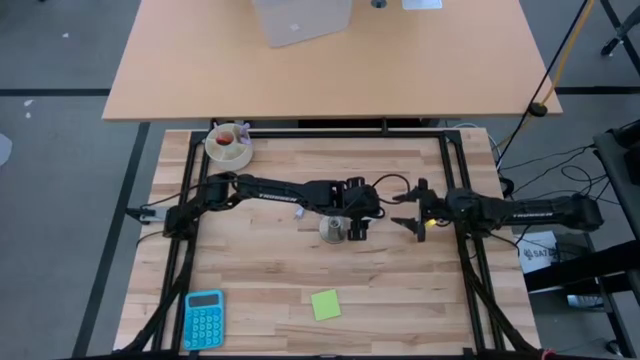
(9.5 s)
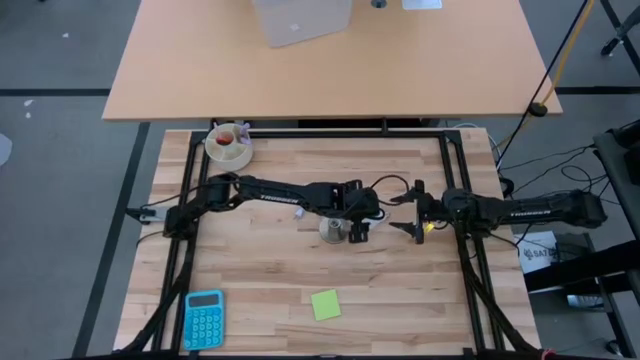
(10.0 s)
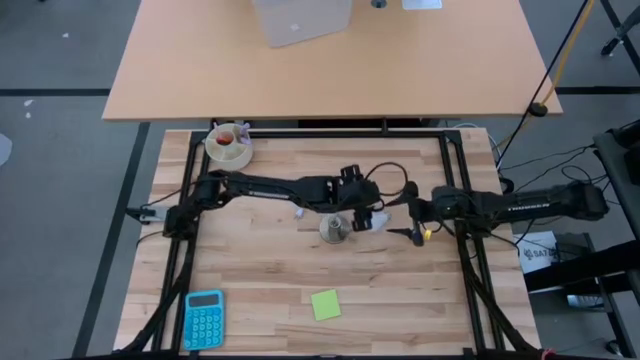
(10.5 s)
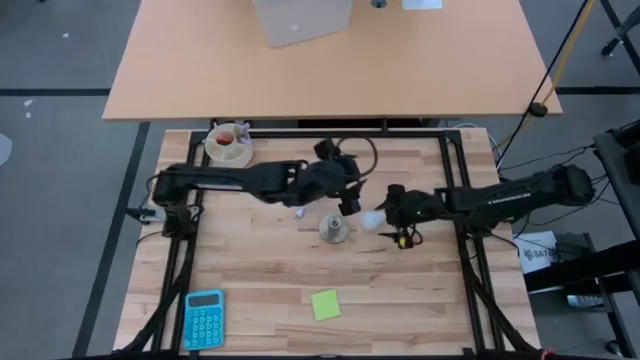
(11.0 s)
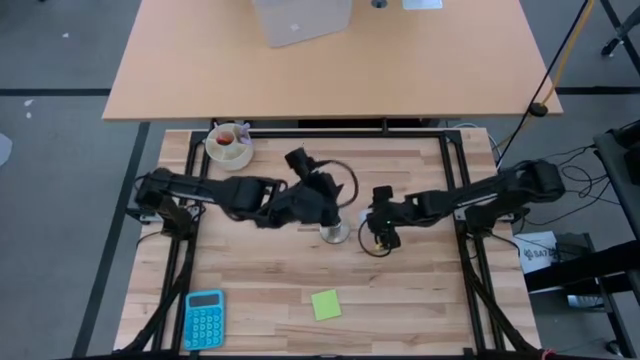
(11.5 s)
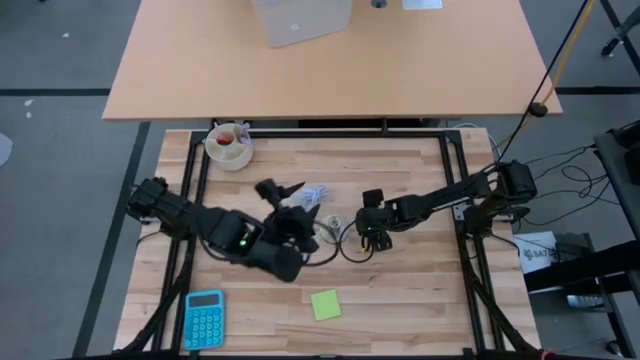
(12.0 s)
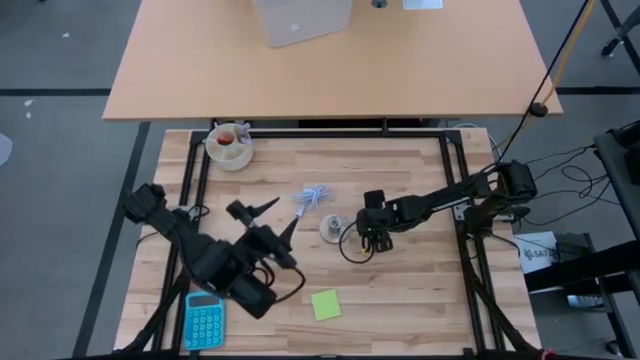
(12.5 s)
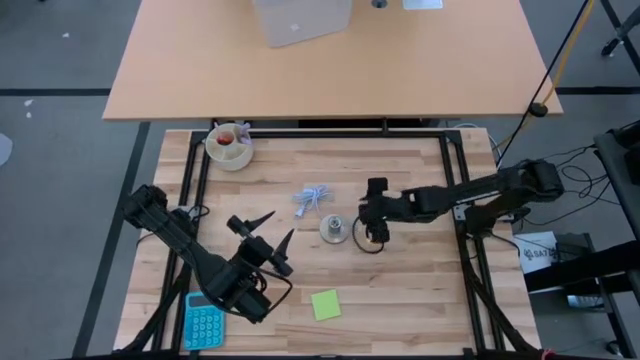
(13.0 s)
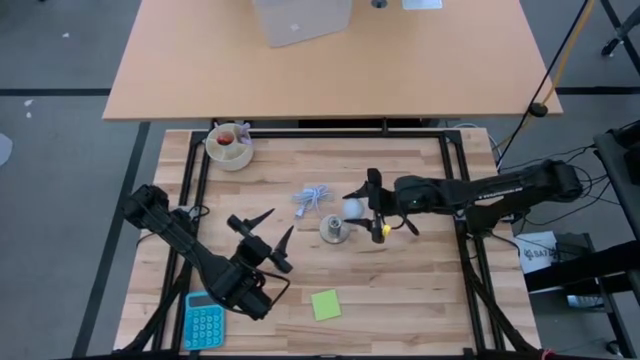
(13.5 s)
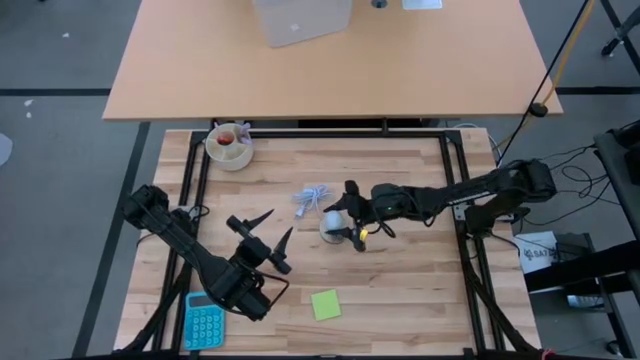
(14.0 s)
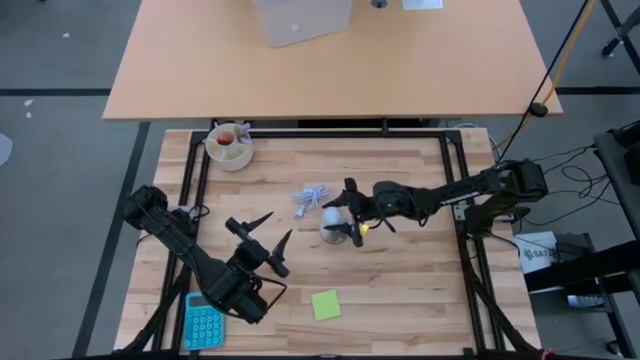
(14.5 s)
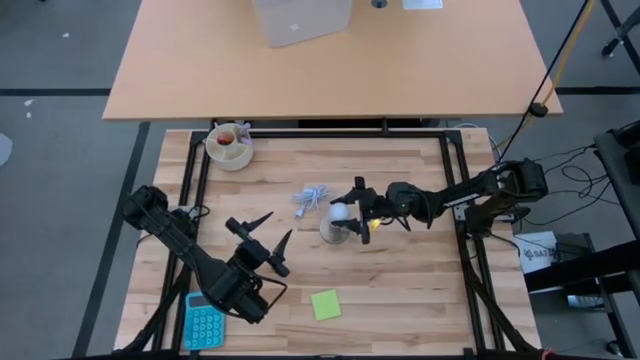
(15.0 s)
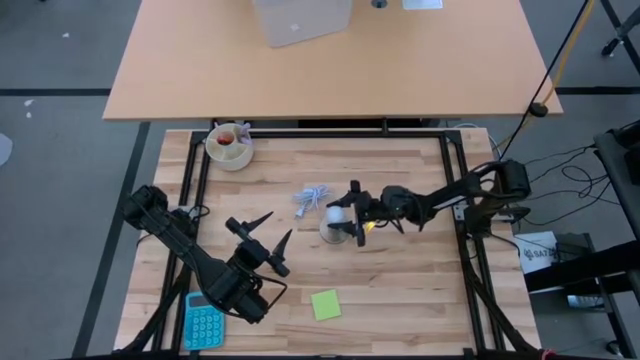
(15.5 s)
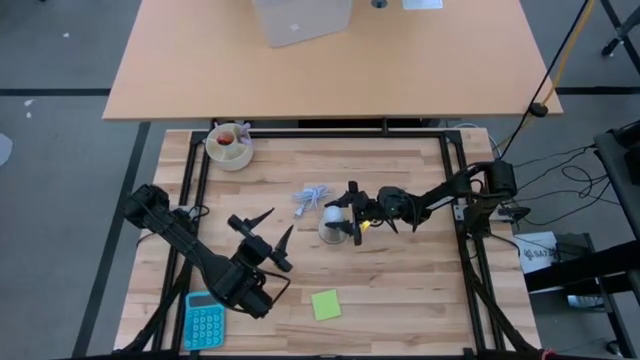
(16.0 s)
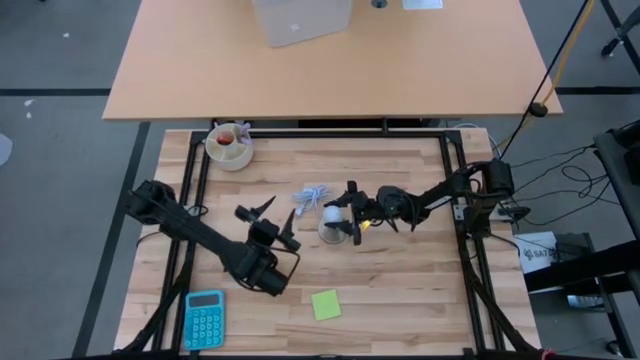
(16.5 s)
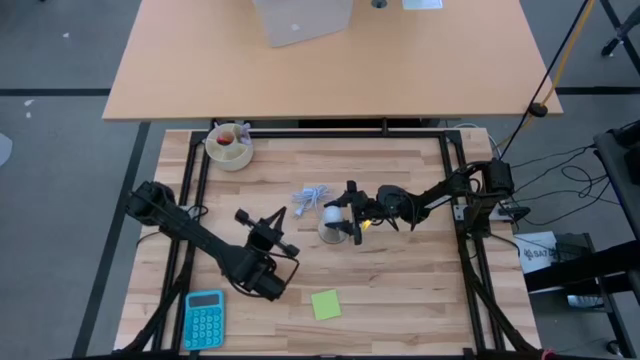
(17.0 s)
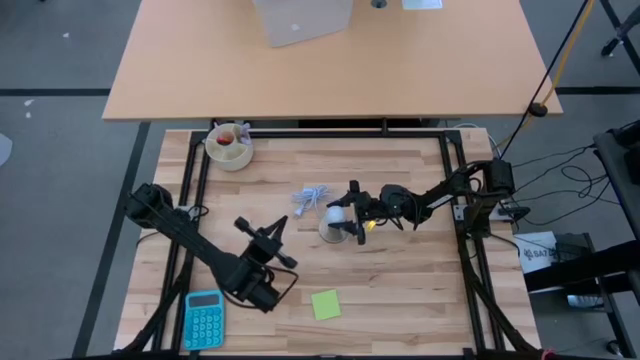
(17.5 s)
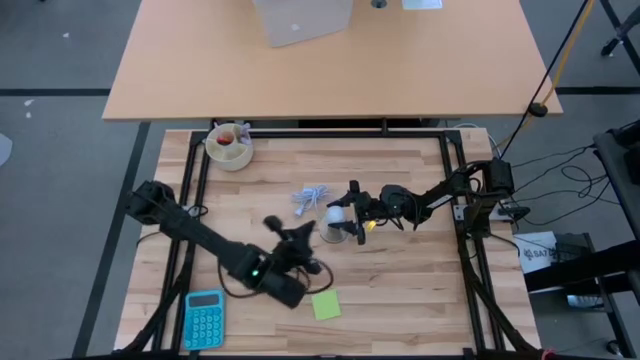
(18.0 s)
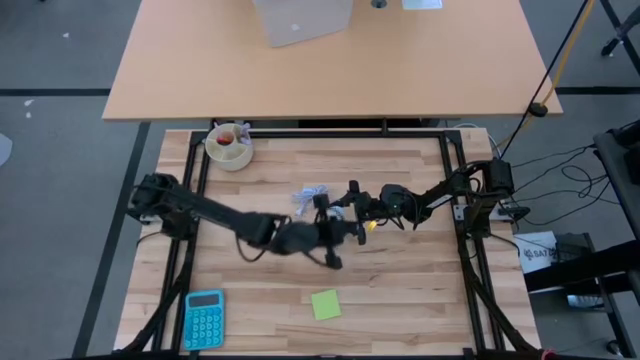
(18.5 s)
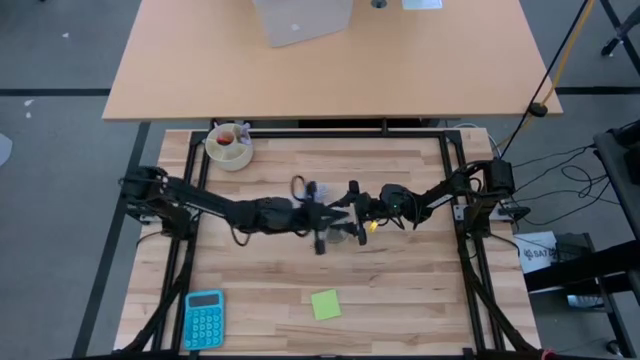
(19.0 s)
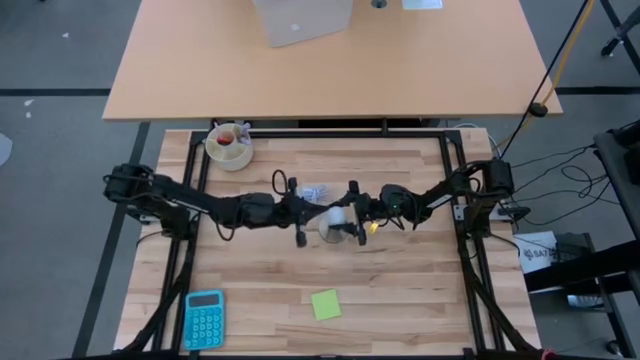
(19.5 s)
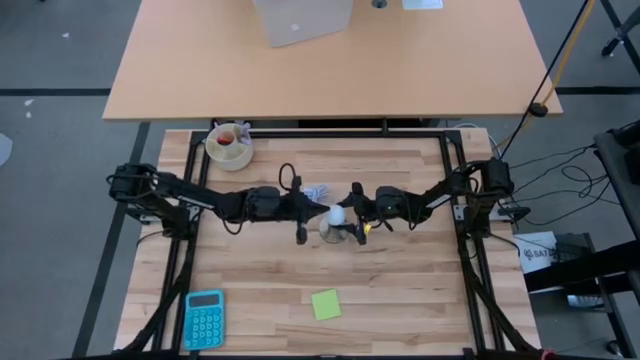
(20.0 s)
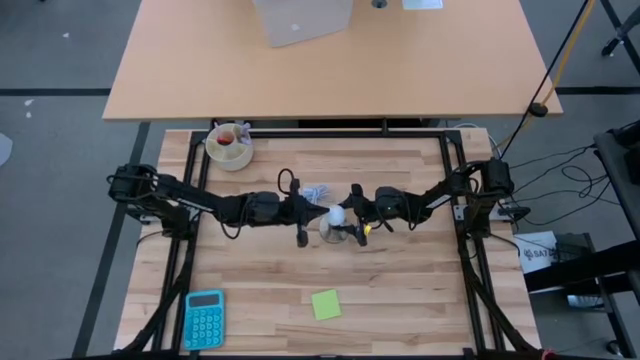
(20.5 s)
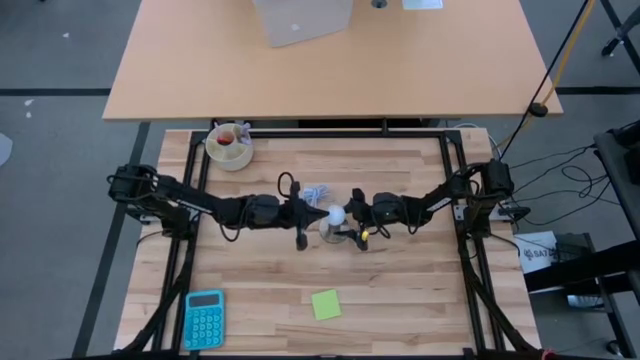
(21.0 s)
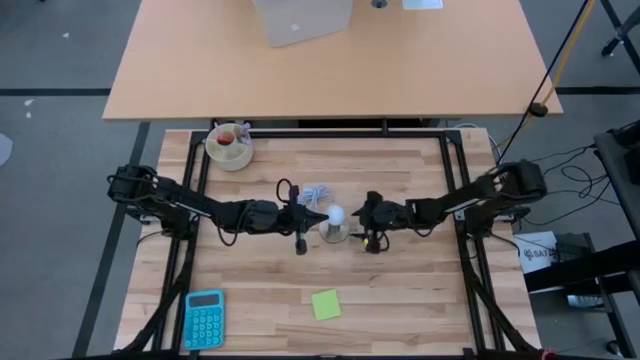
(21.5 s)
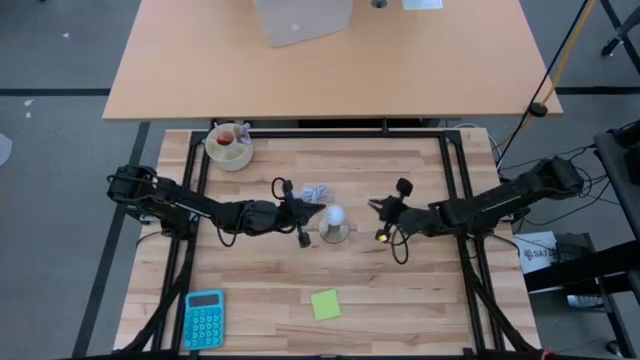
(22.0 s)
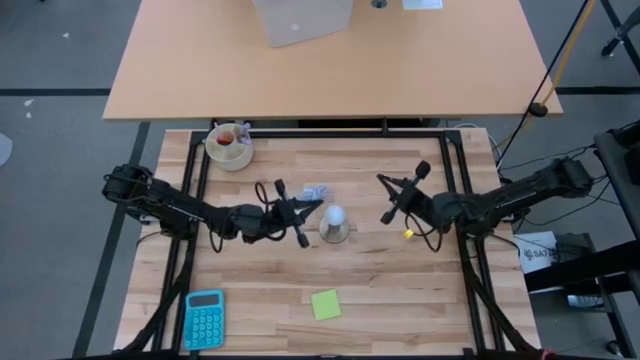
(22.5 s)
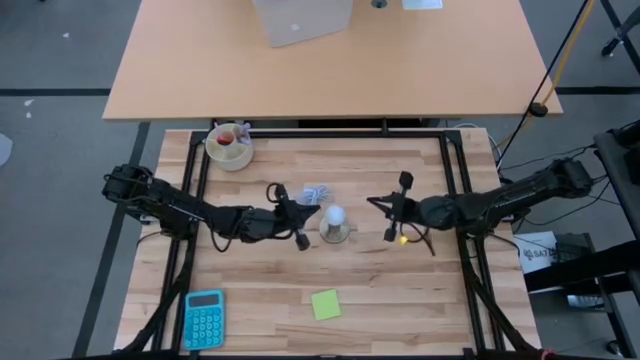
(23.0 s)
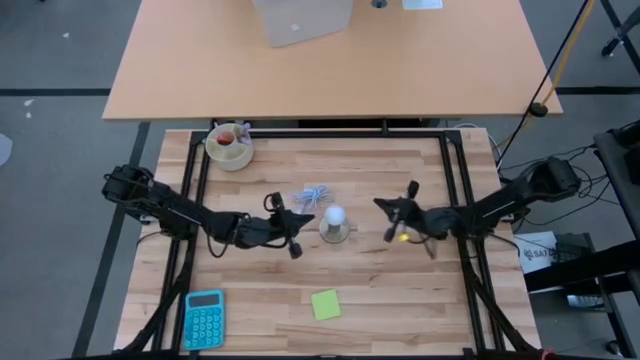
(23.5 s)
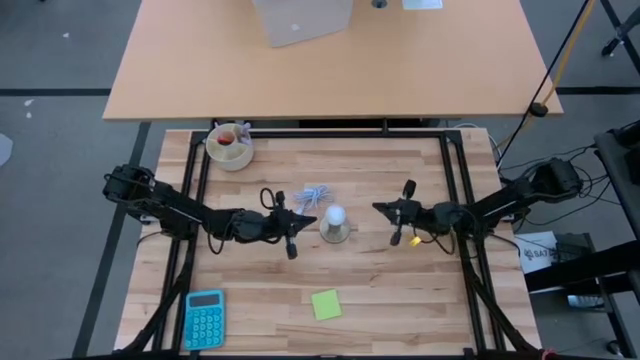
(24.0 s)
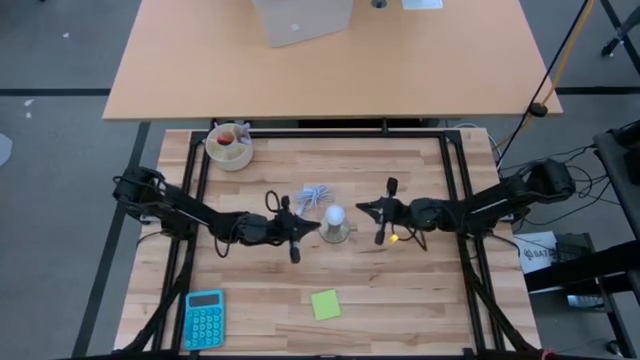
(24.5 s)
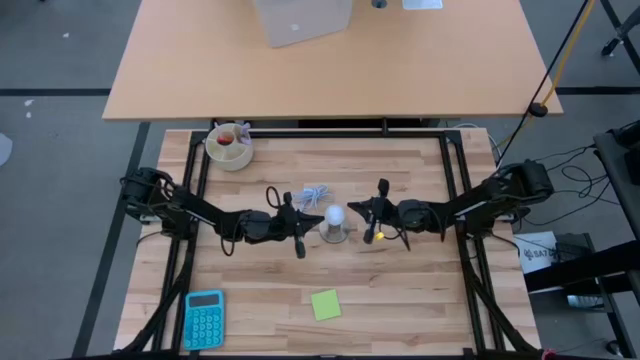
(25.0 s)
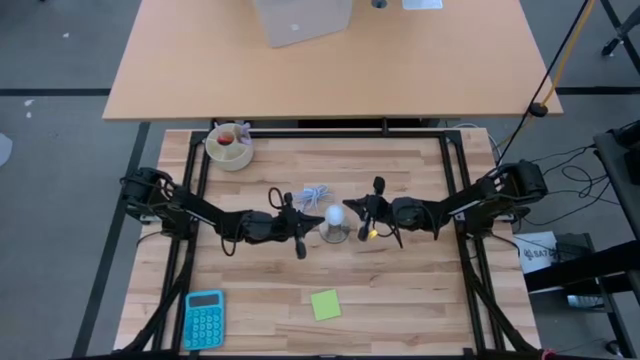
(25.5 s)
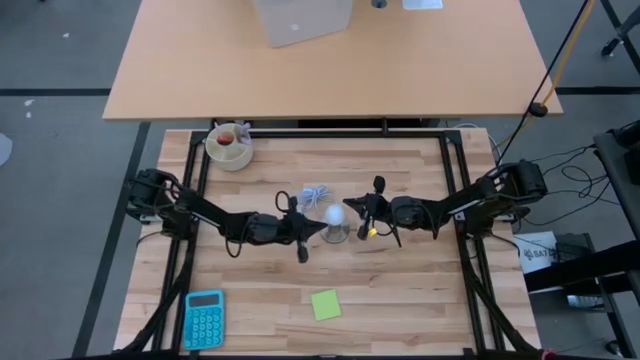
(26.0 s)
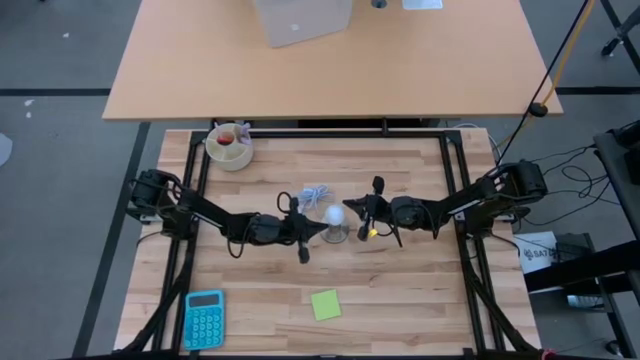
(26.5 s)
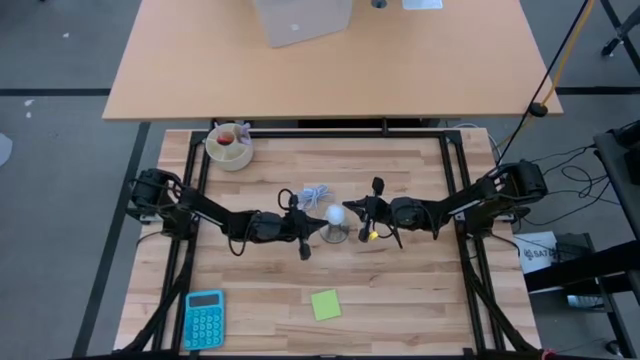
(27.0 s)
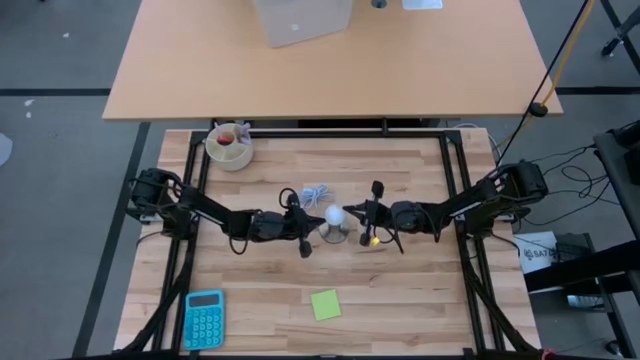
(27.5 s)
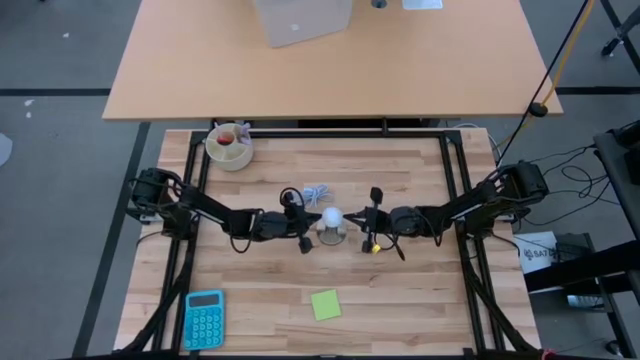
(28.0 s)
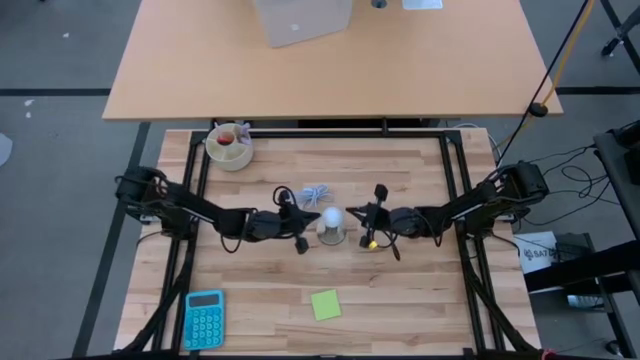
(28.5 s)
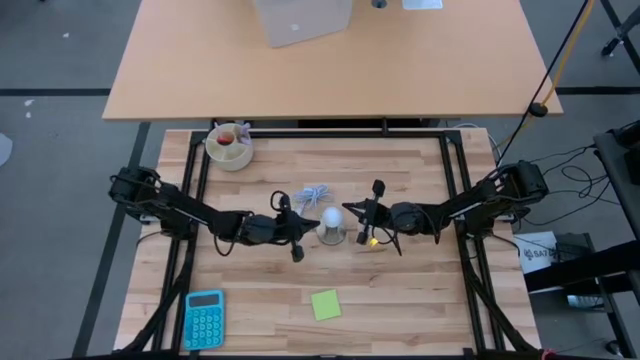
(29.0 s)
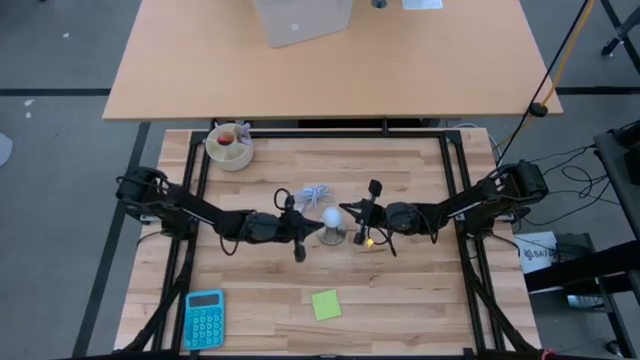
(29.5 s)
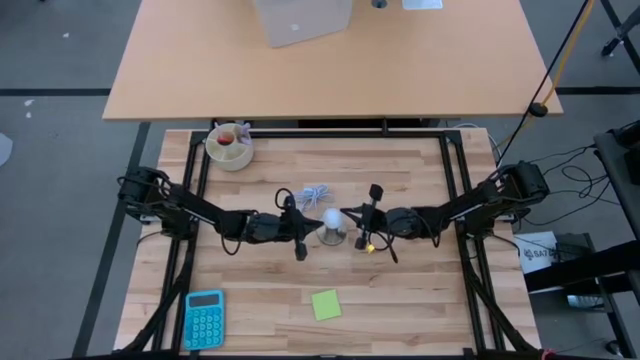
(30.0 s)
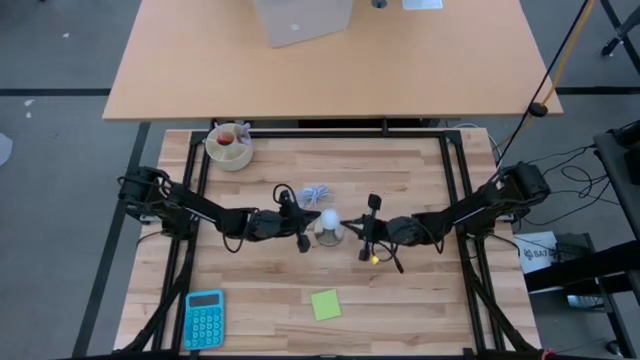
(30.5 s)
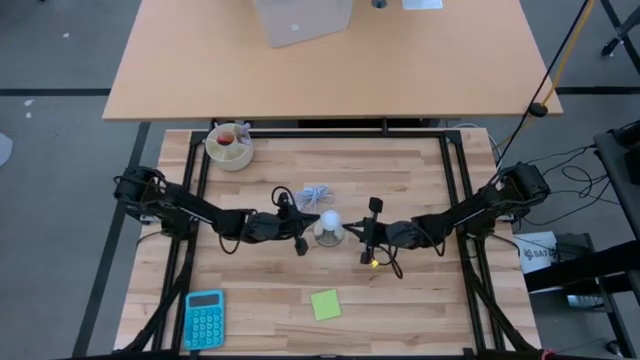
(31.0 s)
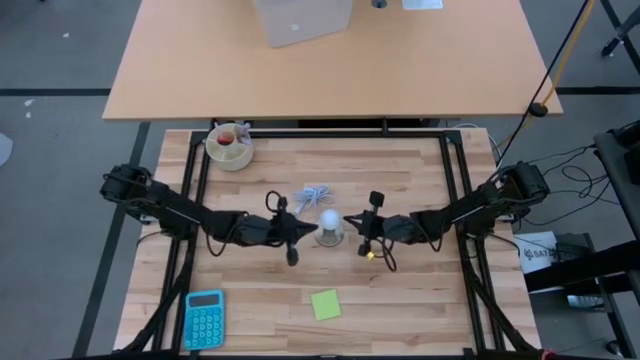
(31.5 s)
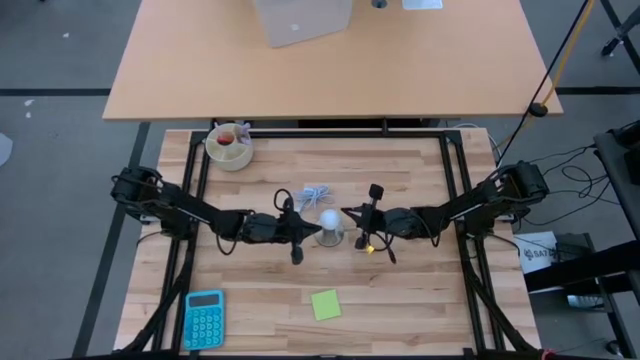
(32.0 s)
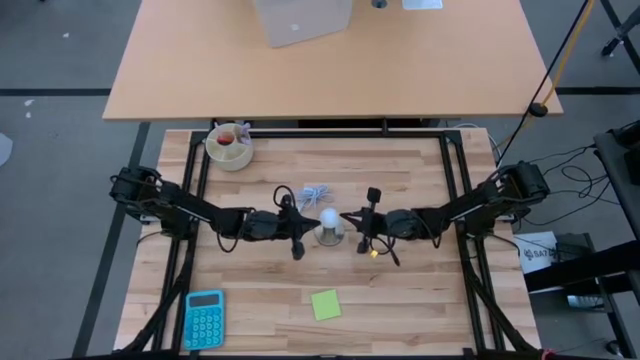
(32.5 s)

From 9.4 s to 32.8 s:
Task: Screw lightbulb
Insert the lightbulb into the lamp
